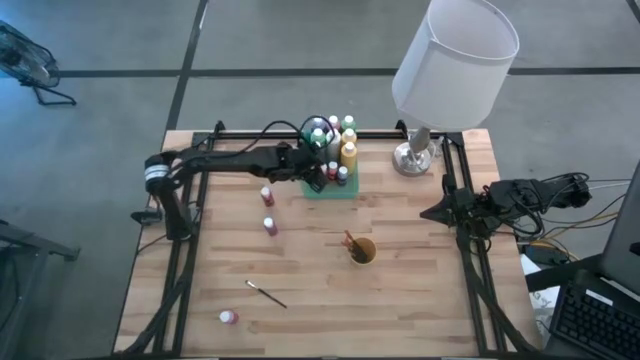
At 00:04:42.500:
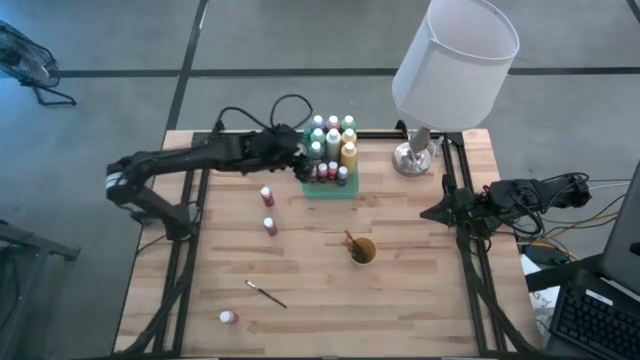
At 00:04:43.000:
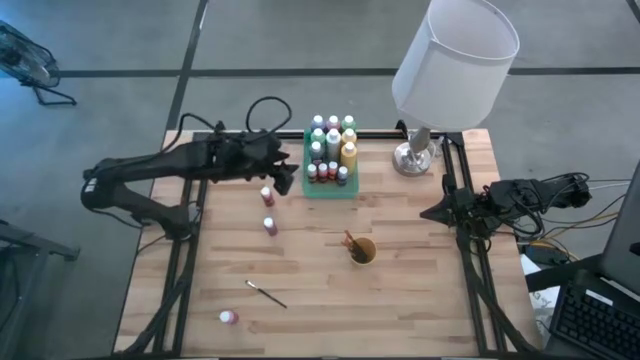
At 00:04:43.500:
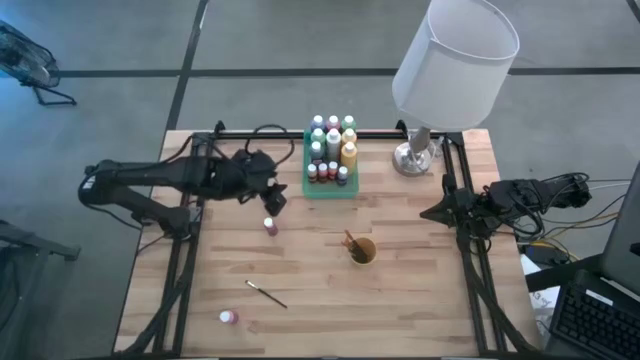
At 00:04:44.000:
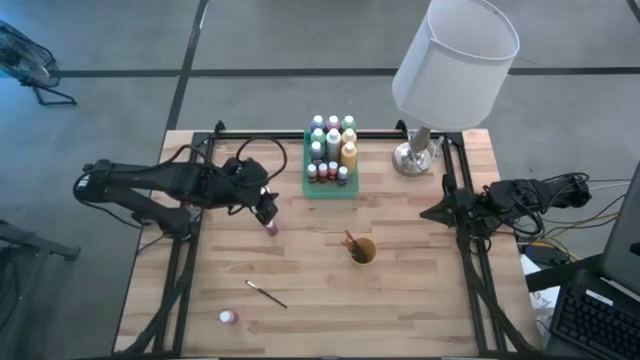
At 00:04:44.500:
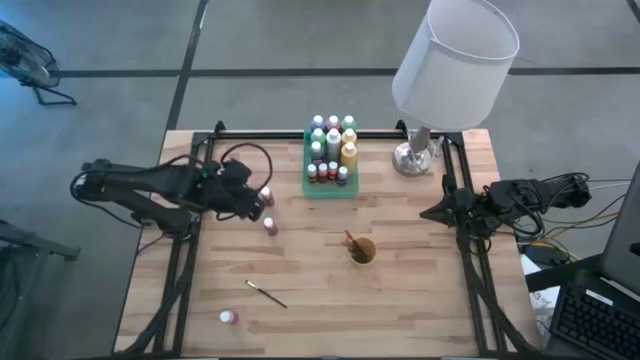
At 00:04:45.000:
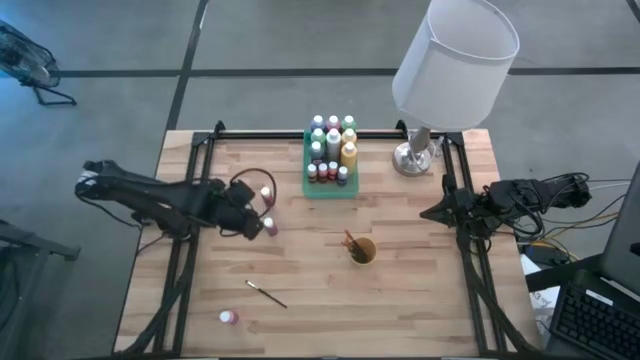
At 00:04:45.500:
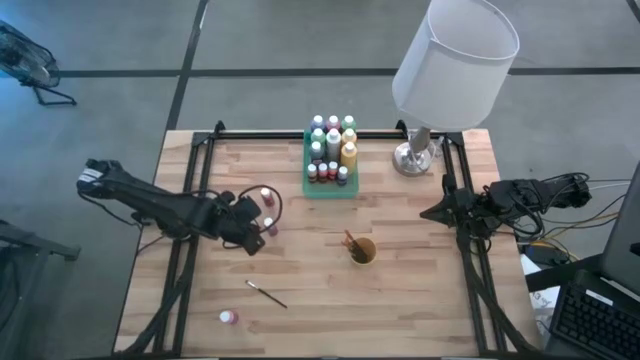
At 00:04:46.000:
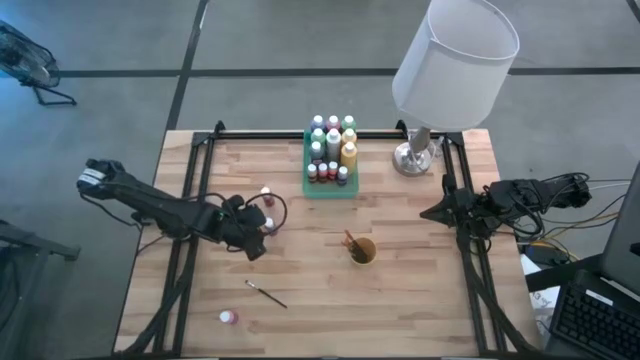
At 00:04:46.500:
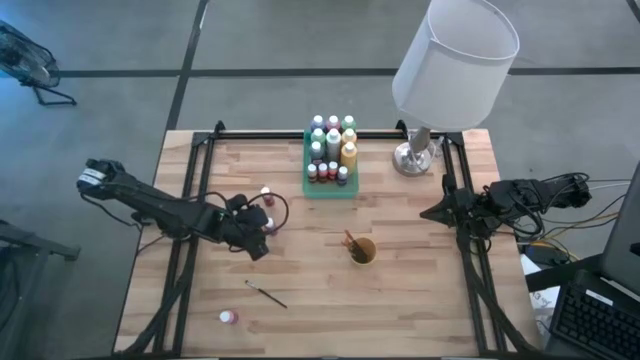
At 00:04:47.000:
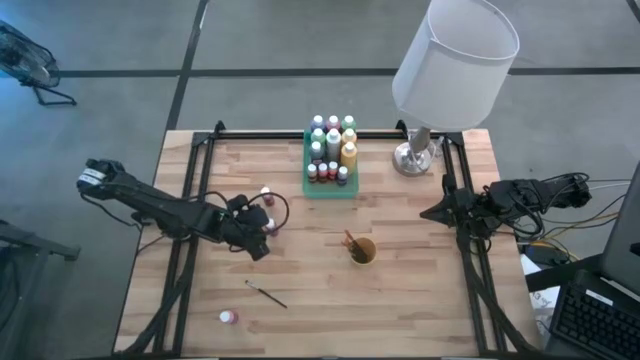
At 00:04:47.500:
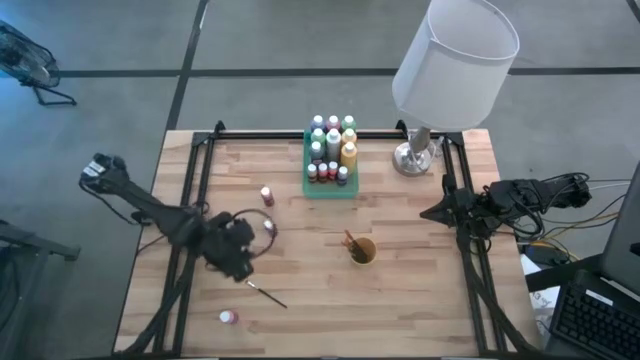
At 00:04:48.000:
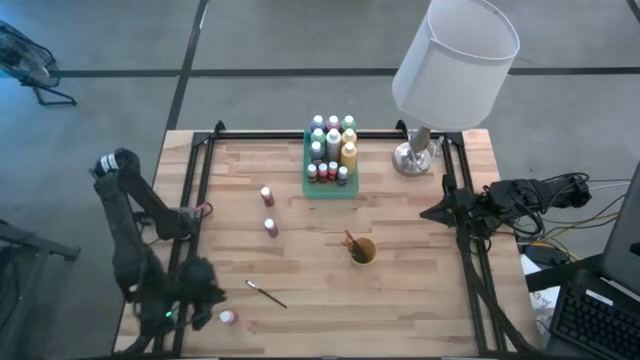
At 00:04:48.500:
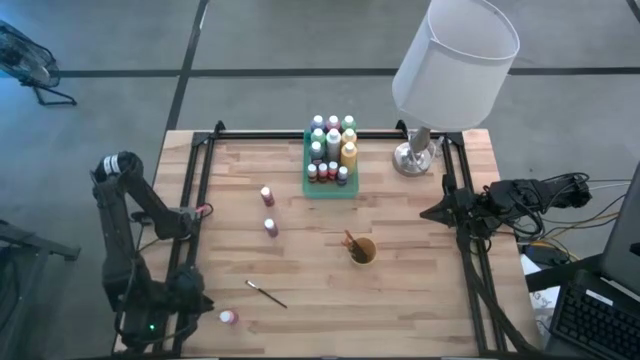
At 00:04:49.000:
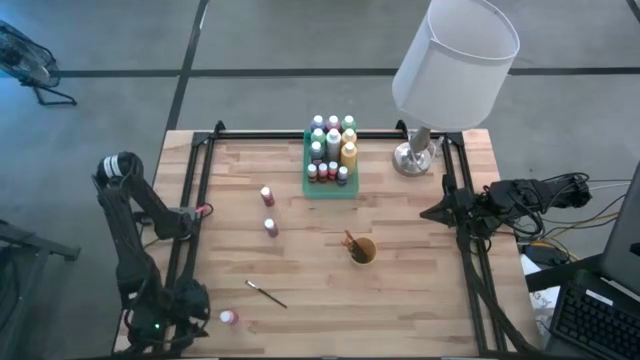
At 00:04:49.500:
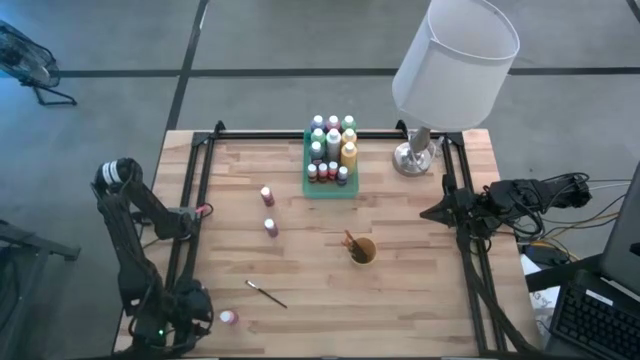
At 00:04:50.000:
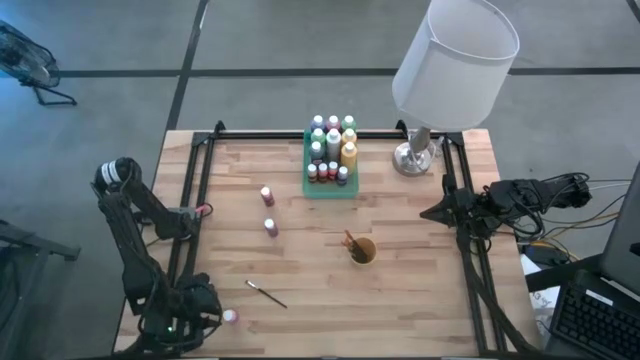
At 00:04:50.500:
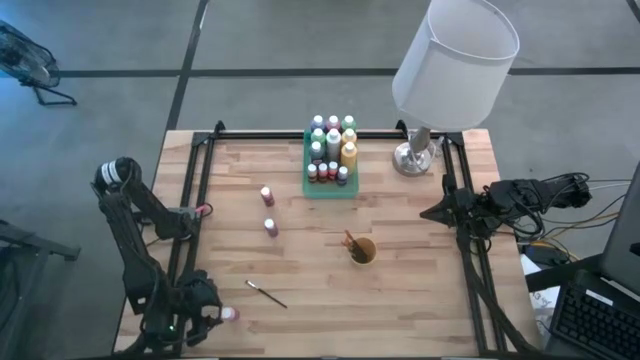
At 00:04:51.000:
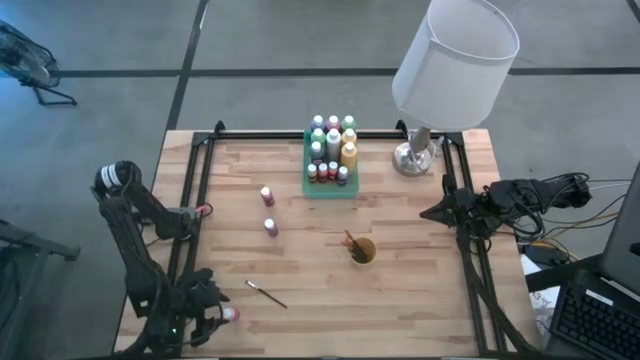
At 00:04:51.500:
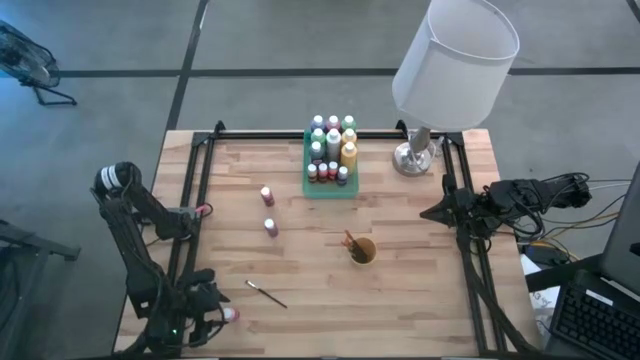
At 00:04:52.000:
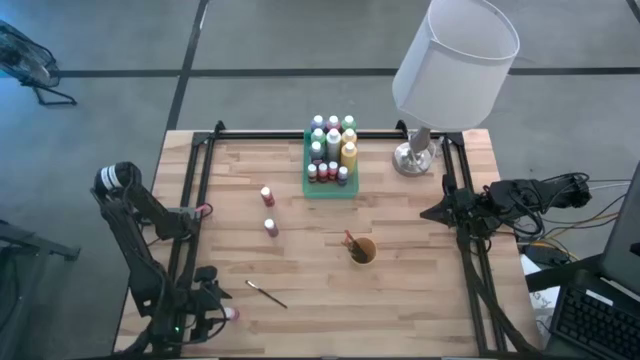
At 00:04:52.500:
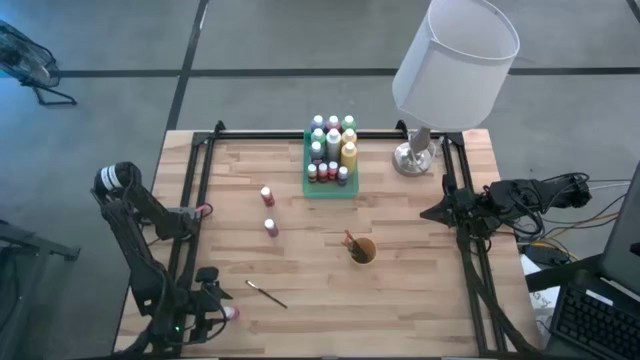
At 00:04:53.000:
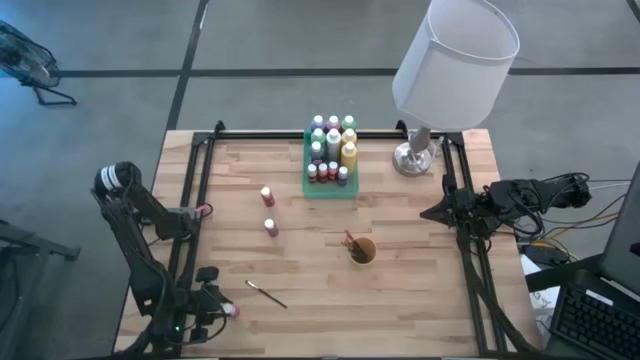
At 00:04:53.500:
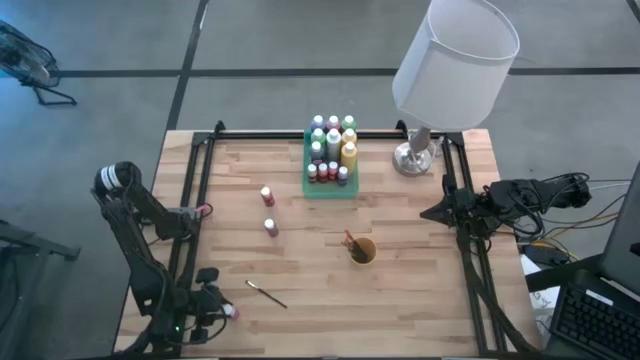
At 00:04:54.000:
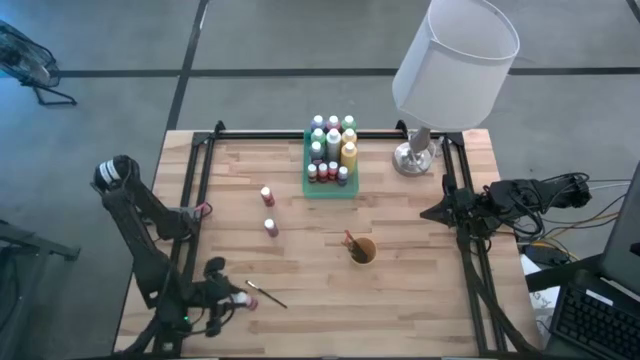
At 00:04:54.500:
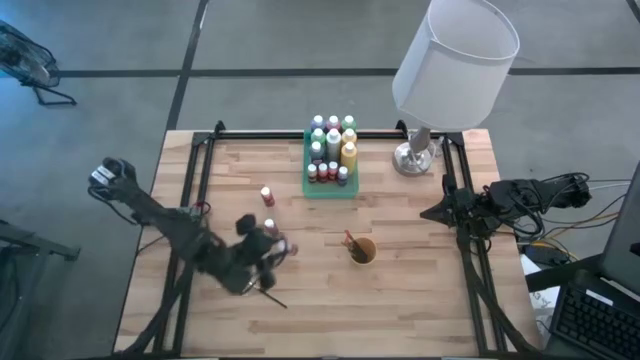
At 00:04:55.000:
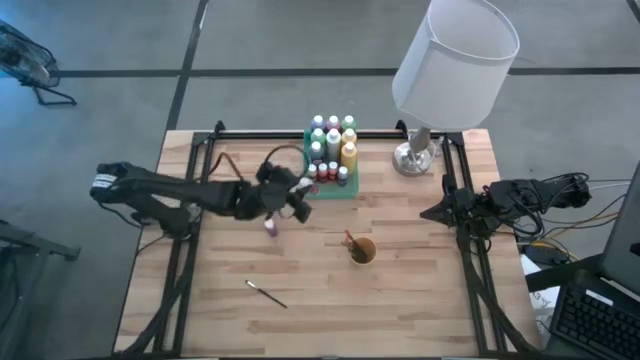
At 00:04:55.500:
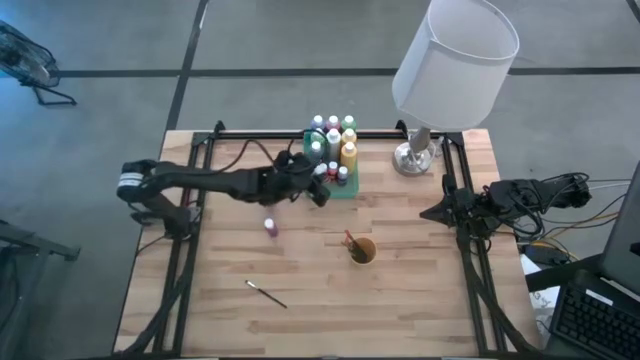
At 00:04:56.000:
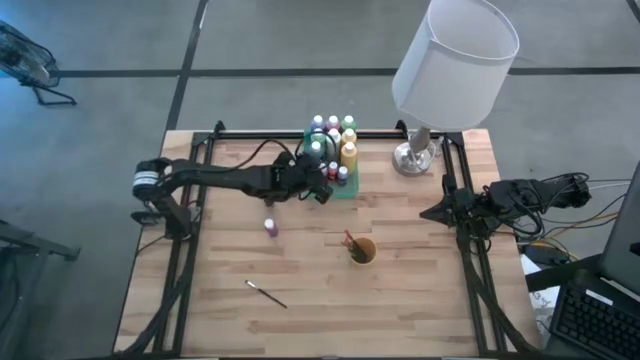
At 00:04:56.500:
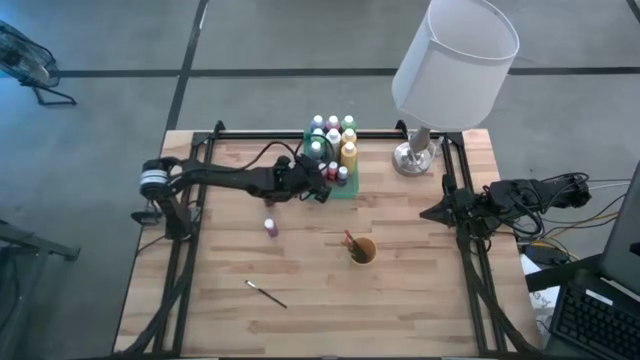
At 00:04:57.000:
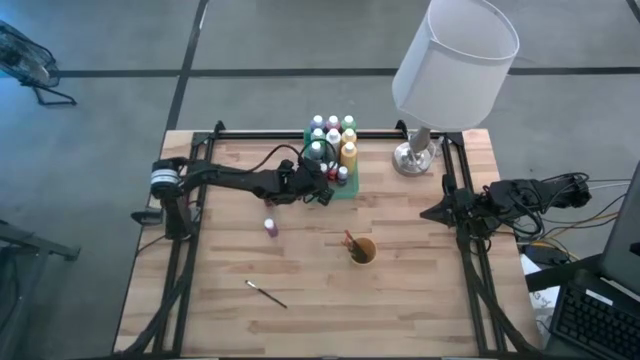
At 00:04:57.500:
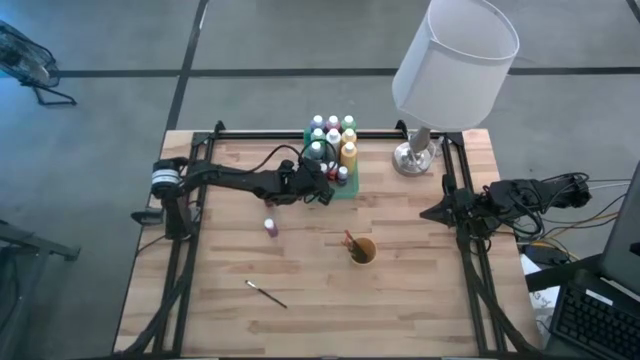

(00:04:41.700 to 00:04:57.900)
Task: Pick & Place Paint Supplies
Put the small pink paint bottle into the green bin

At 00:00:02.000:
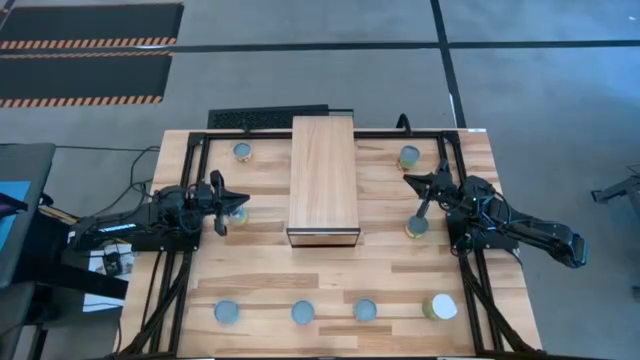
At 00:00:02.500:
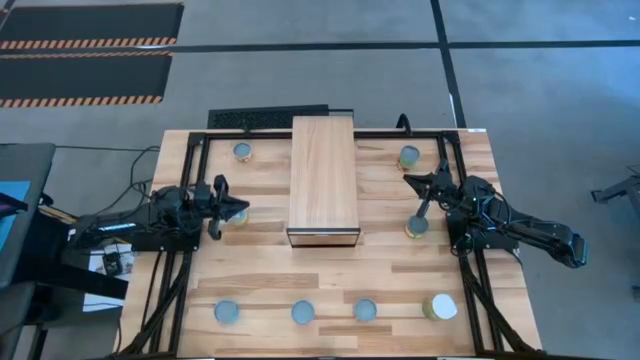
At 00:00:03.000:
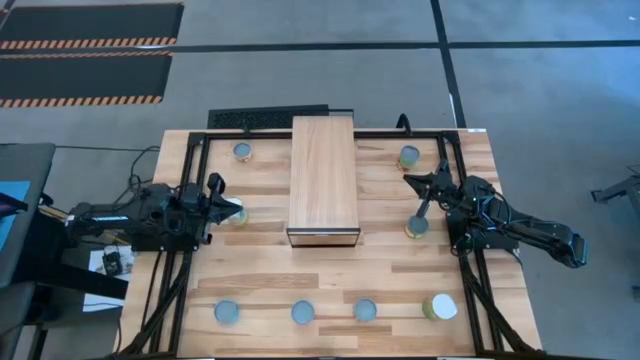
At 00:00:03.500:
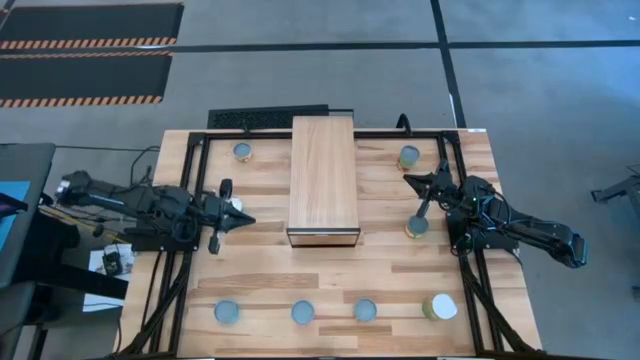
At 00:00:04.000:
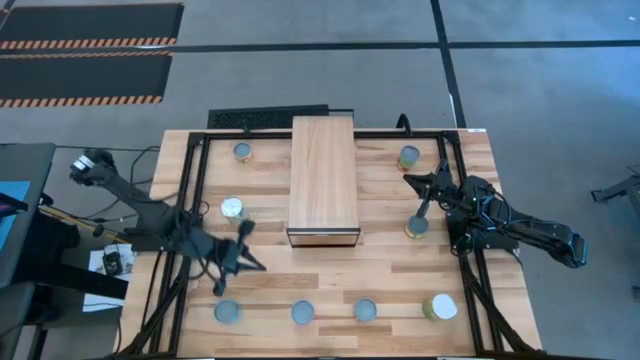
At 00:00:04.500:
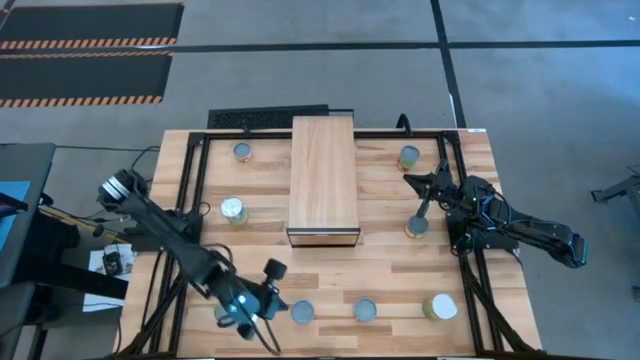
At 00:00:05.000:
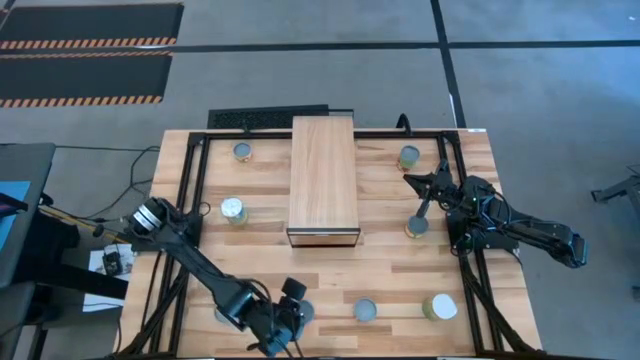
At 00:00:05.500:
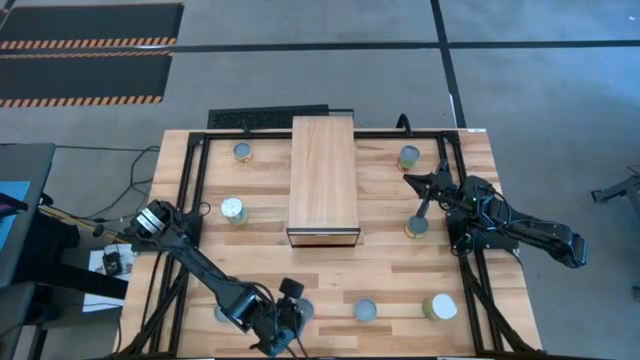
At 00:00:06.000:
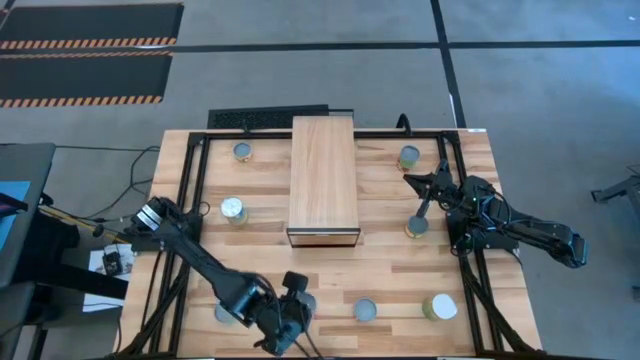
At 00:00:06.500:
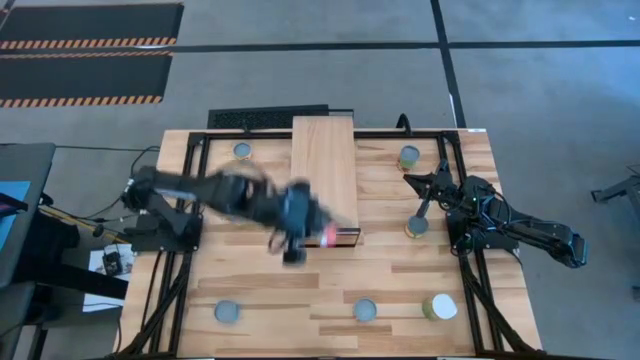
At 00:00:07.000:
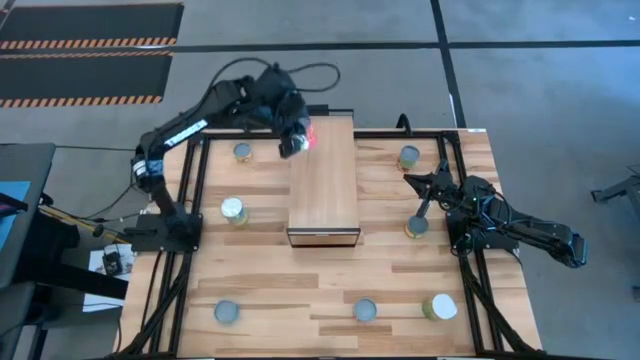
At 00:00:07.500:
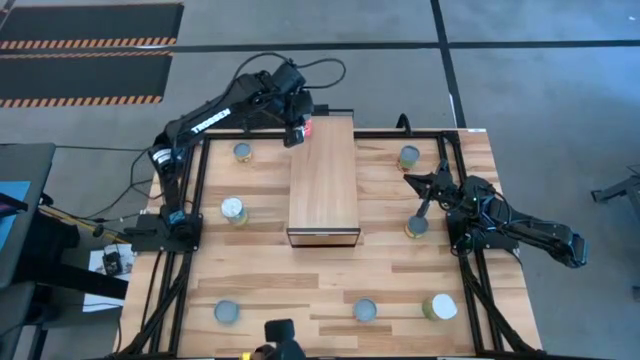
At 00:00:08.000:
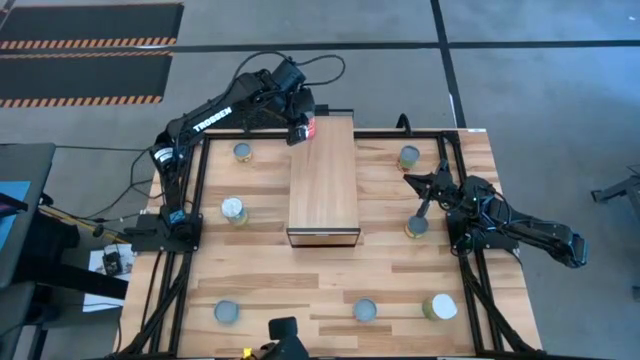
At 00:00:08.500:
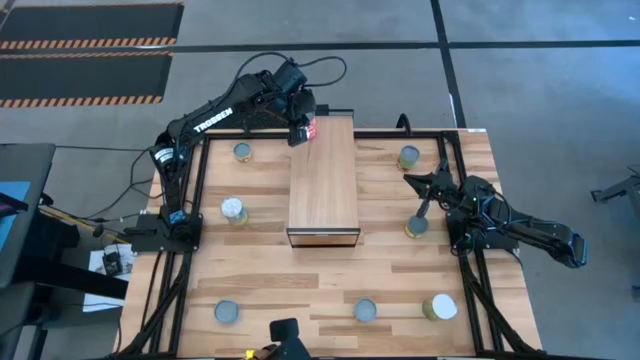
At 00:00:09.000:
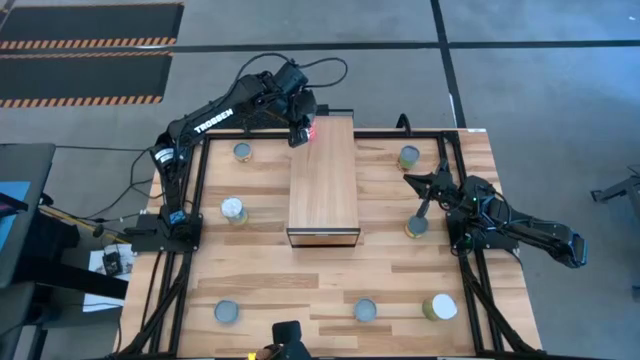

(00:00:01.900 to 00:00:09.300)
Task: Pick and place cans onto a shelf
Put the canned mixed fruits on the shelf
